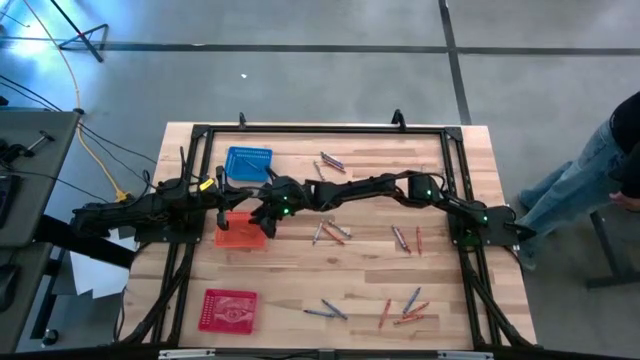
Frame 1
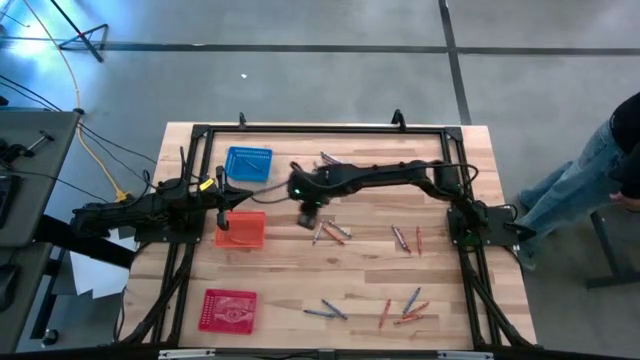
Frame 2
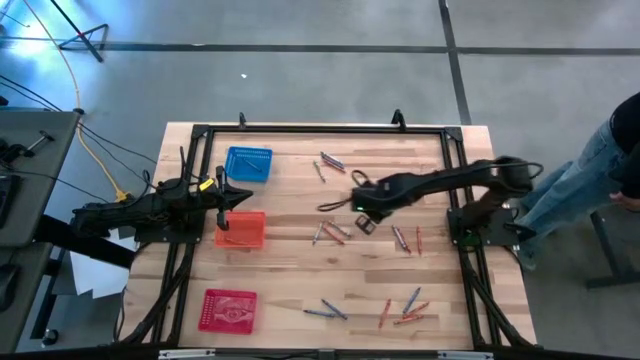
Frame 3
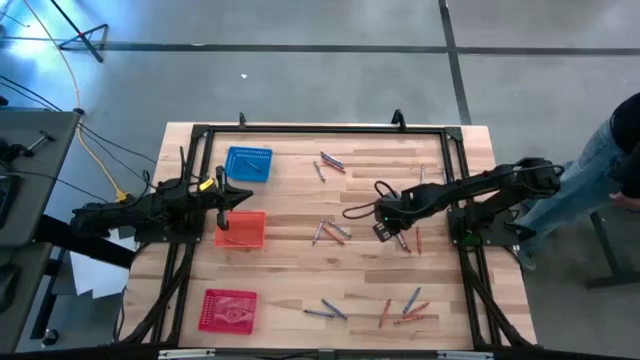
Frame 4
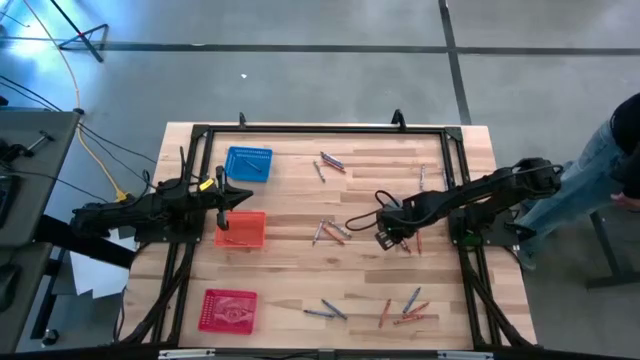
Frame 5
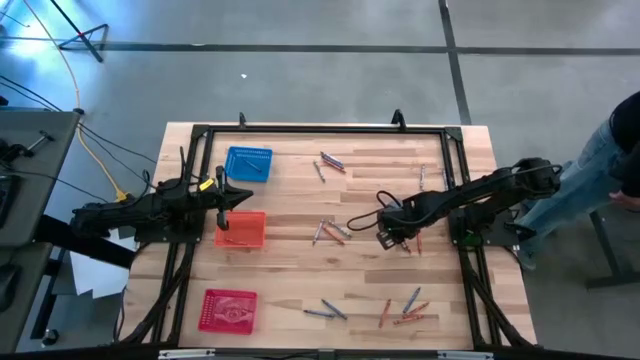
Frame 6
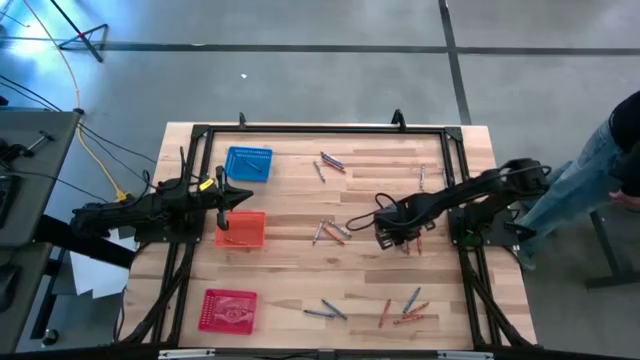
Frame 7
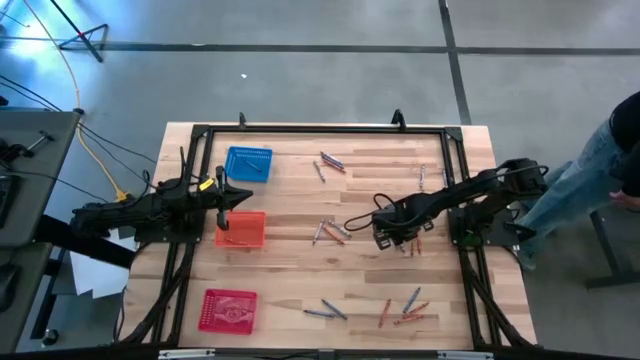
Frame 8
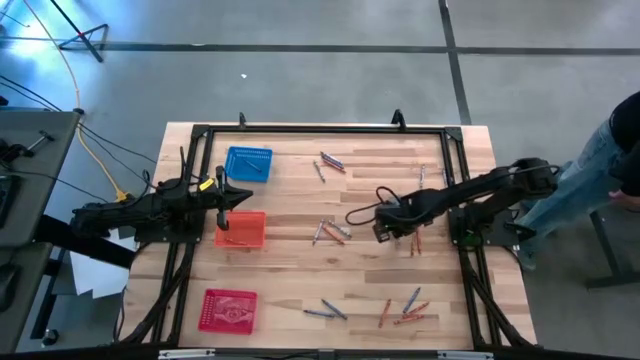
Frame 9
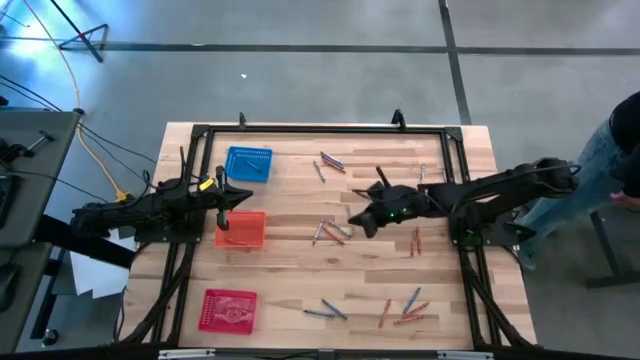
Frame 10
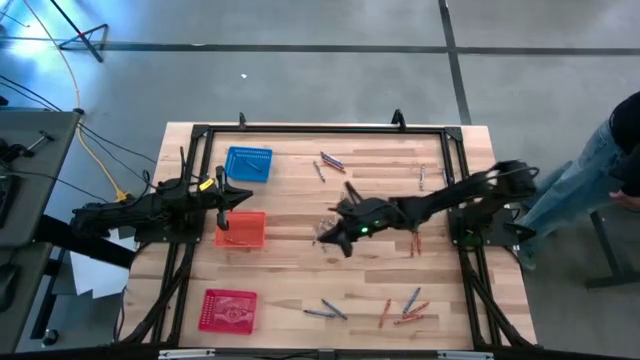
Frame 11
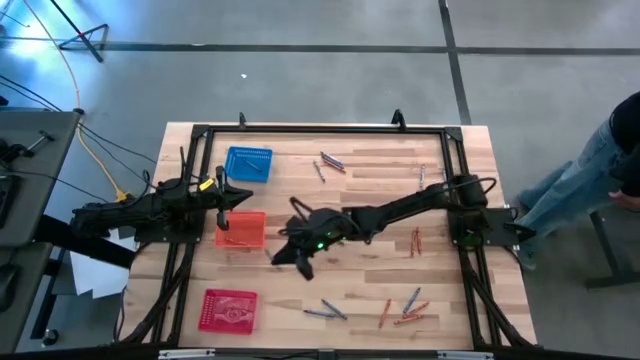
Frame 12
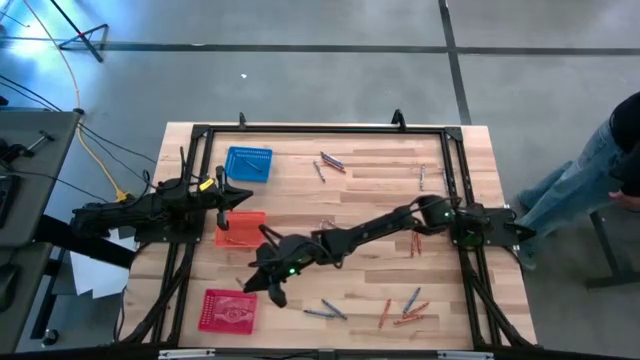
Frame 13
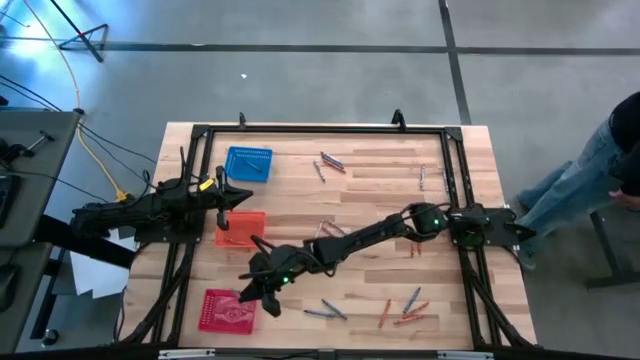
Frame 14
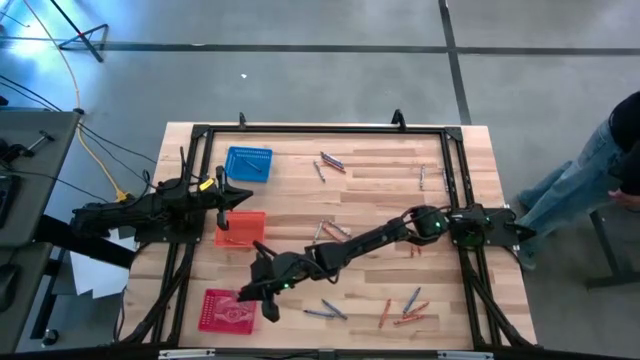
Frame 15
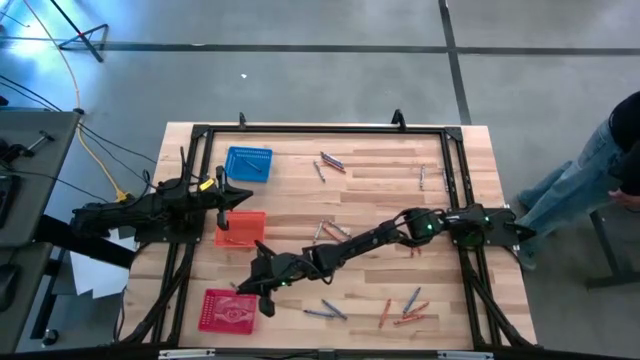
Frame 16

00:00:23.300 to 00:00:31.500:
Task: Sort crayons
Put the gray crayon into the red bin

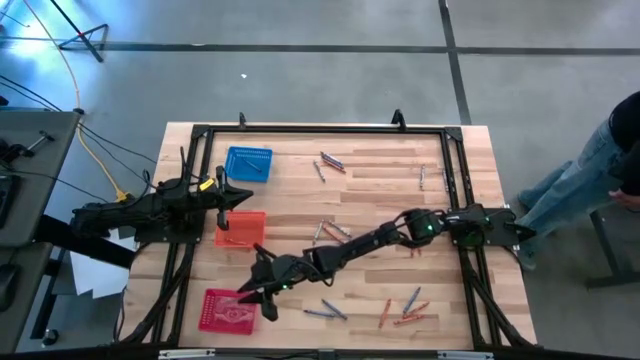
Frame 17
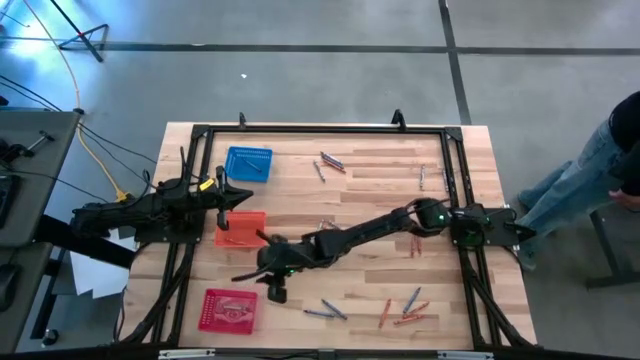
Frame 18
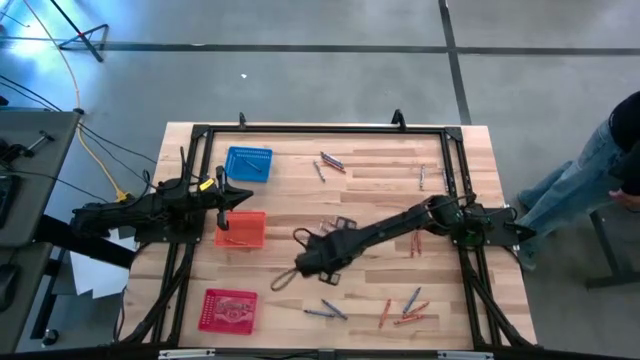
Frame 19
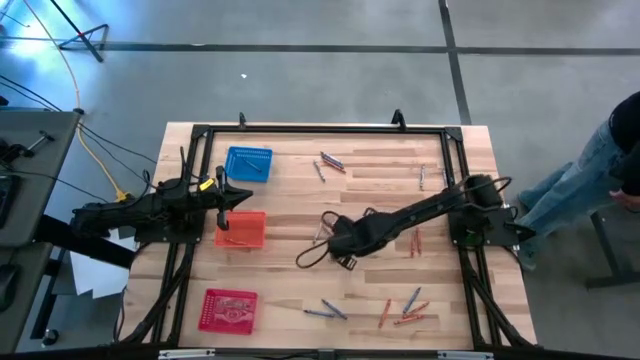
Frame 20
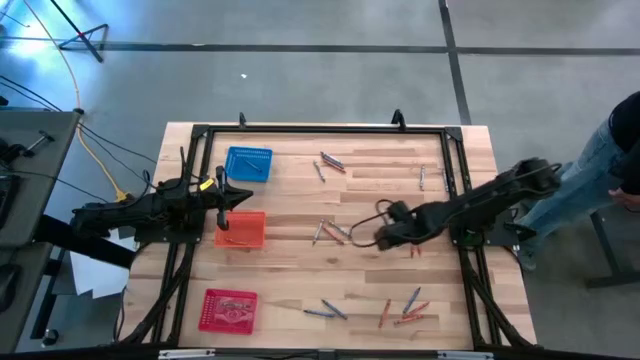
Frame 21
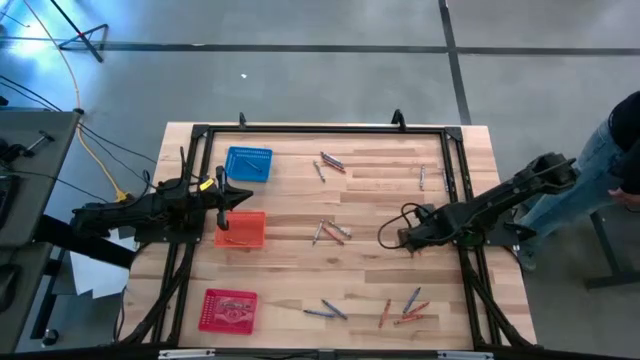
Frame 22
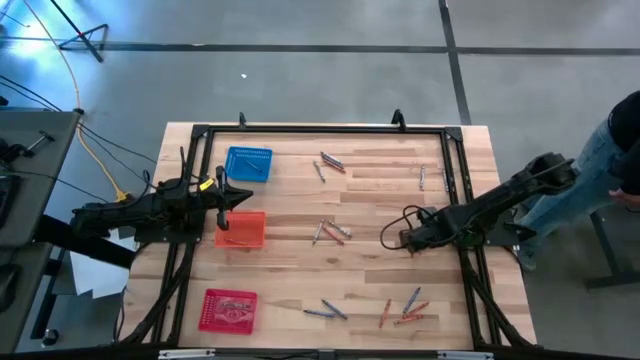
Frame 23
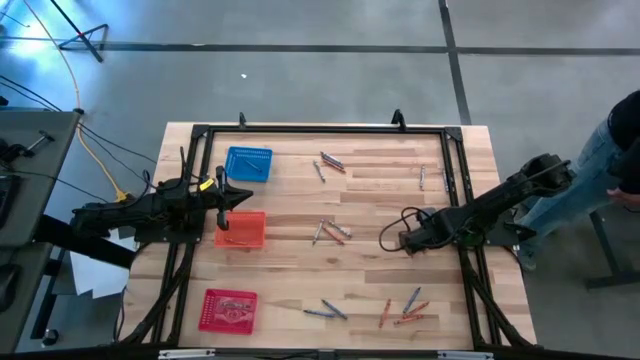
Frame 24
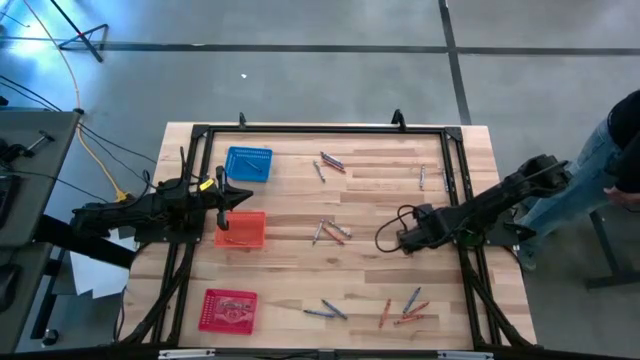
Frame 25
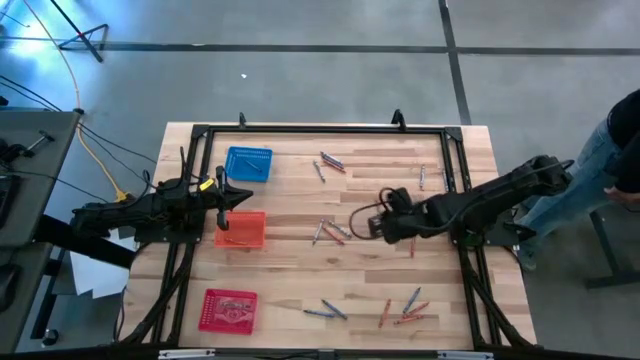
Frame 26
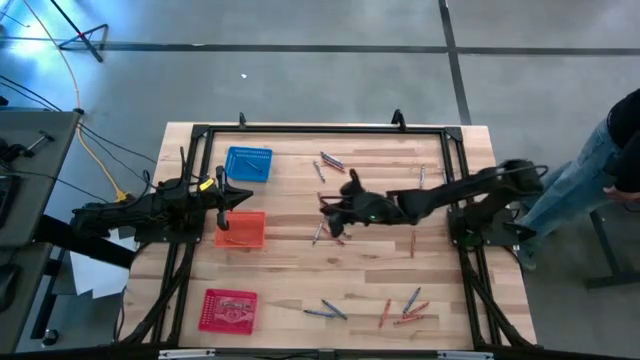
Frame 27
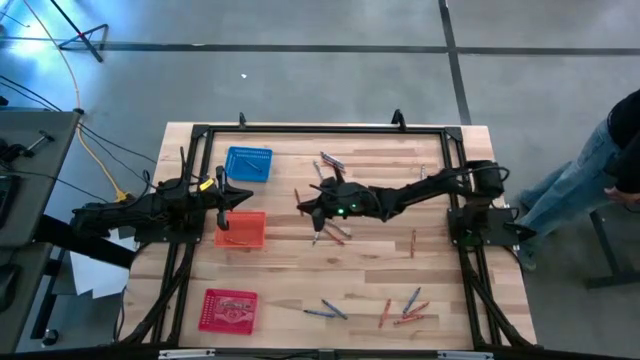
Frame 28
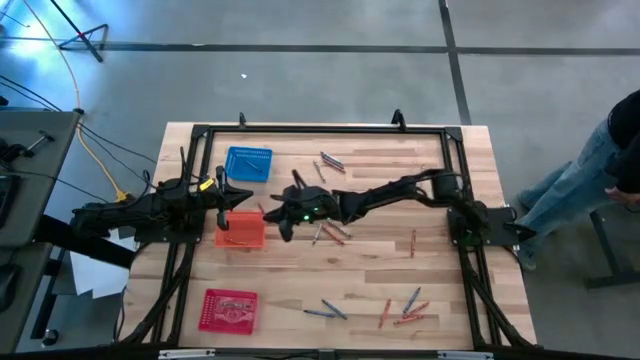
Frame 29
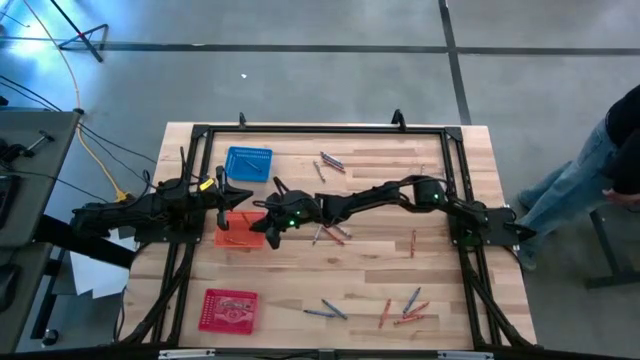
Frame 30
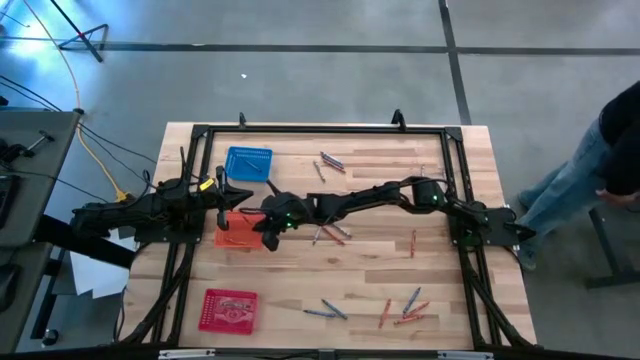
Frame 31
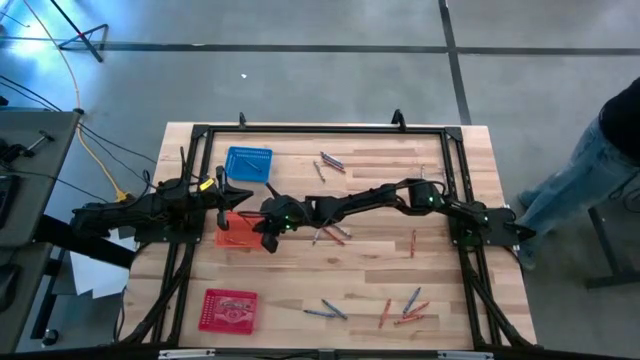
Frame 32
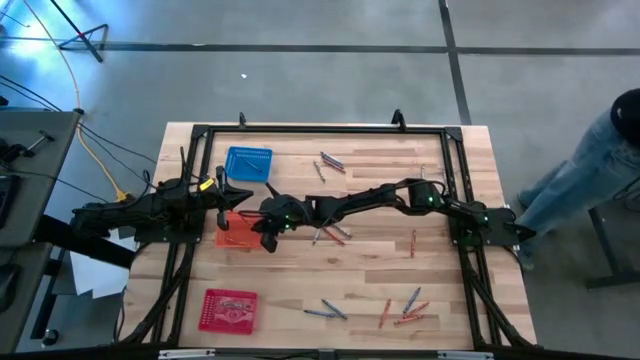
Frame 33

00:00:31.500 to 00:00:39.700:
Put the orange crayon into the orange bin

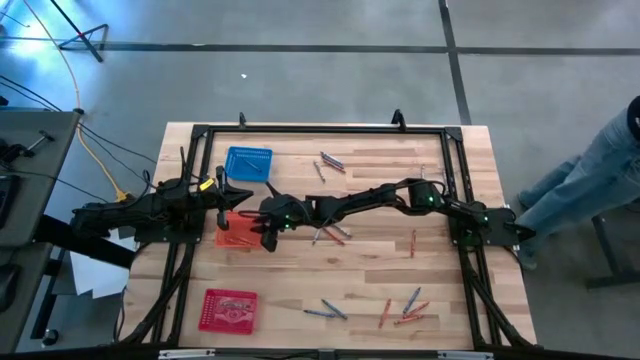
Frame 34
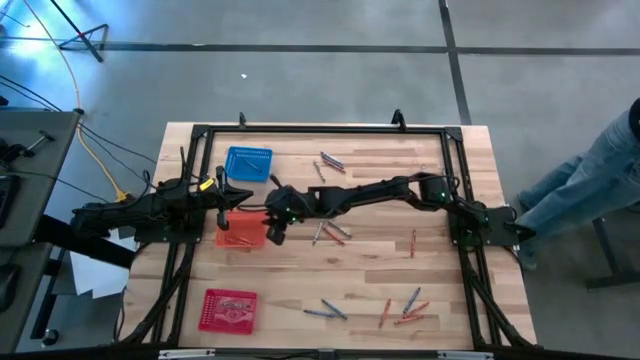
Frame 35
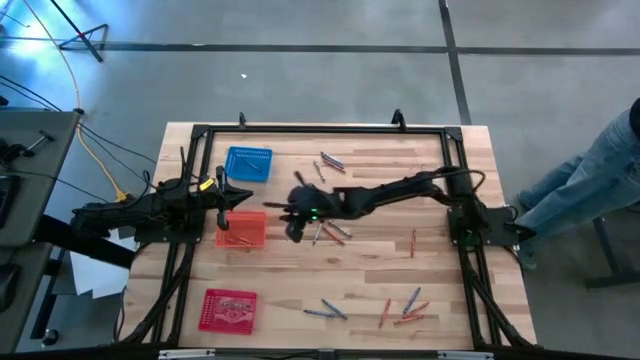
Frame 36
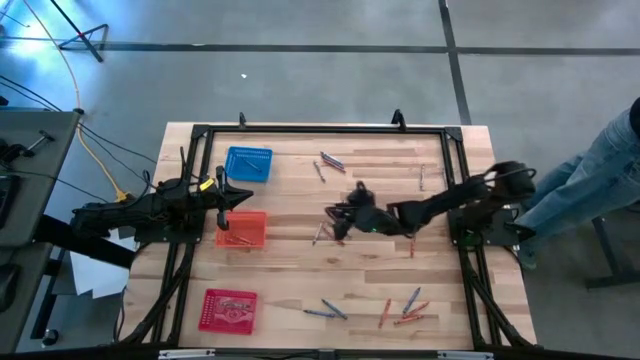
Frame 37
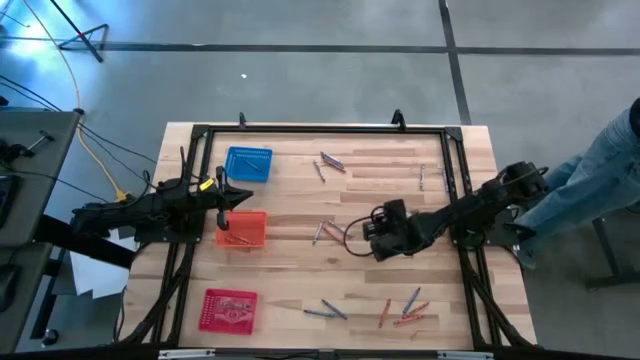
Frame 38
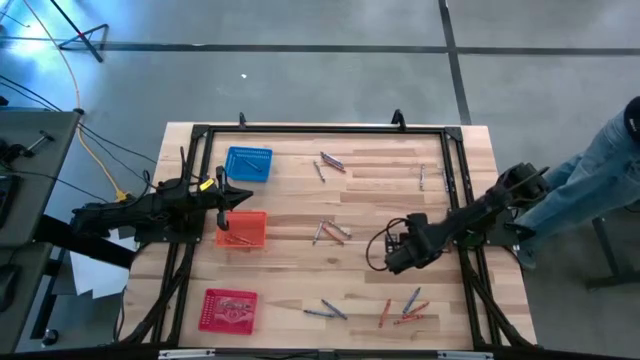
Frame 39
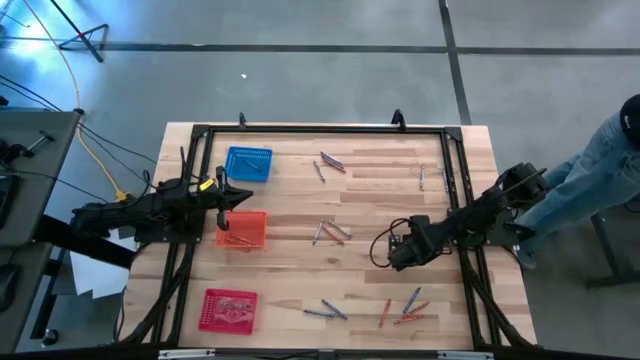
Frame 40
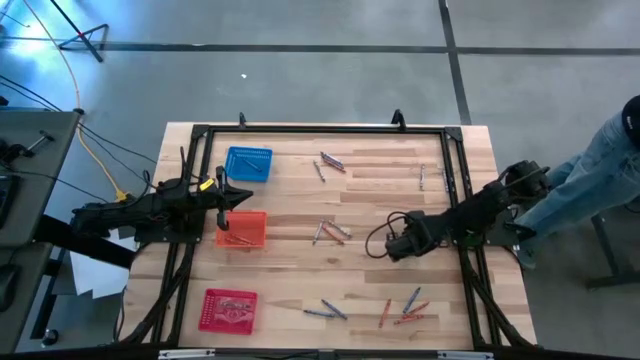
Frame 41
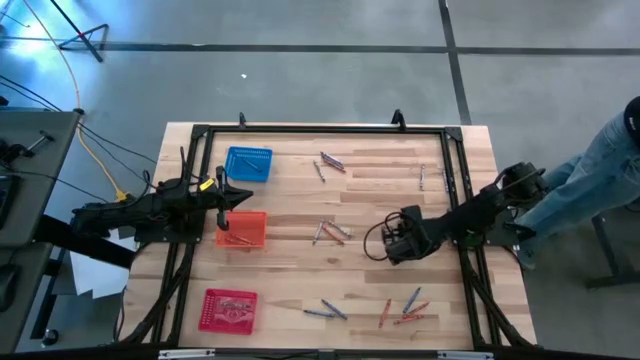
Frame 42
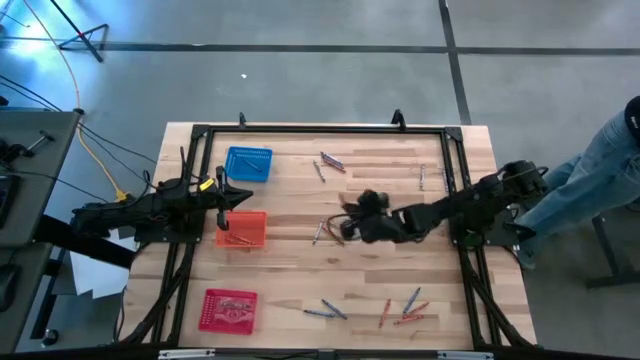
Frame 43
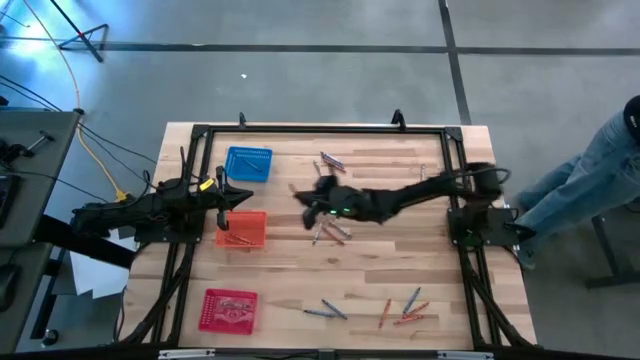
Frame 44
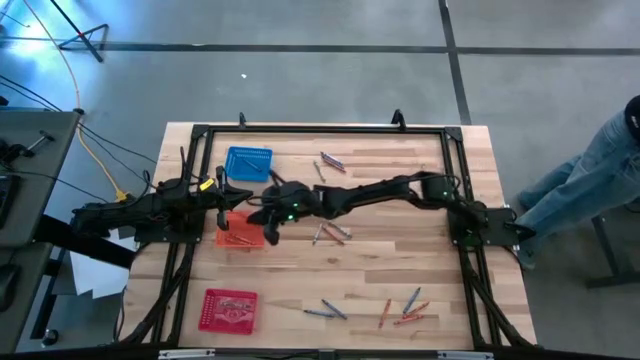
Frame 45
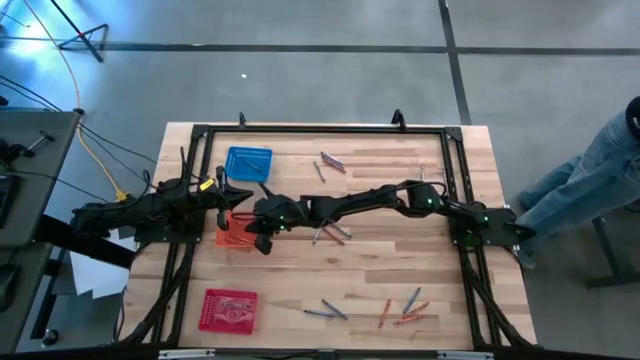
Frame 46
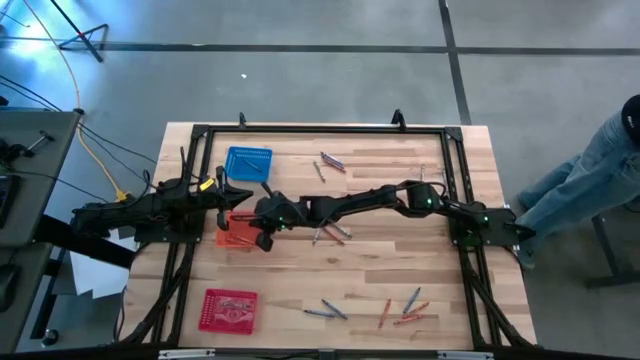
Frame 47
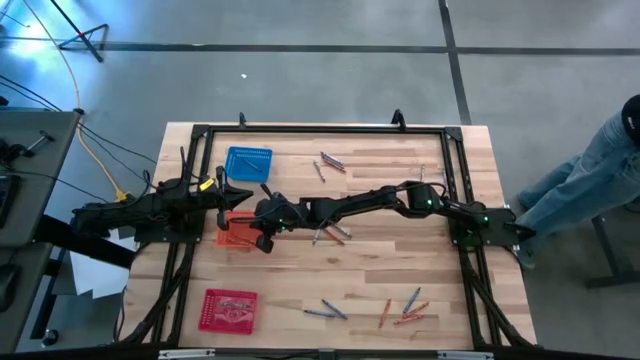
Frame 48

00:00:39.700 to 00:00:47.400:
Put the orange crayon into the orange bin
